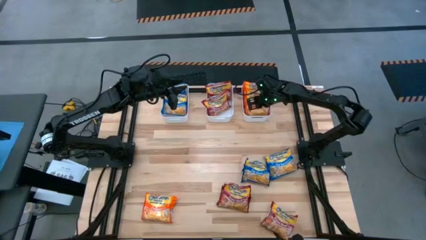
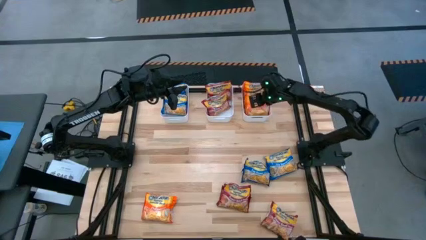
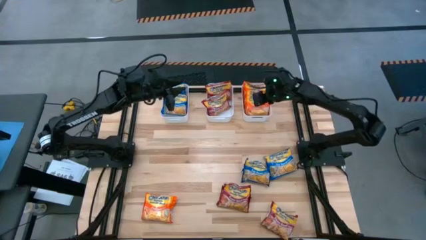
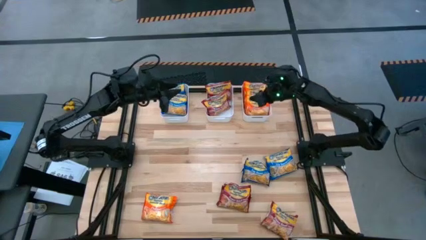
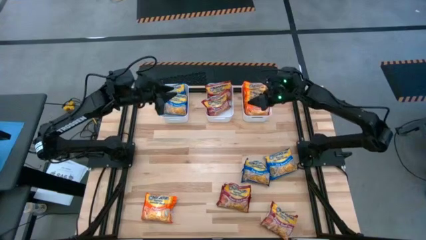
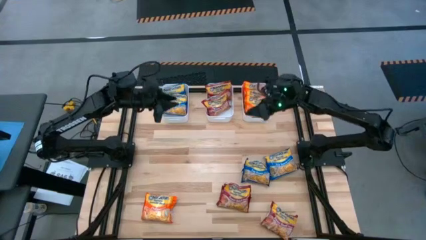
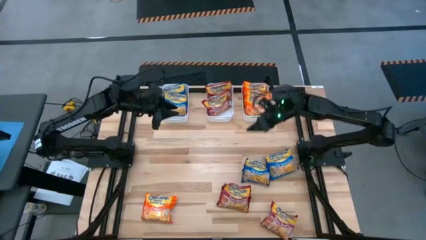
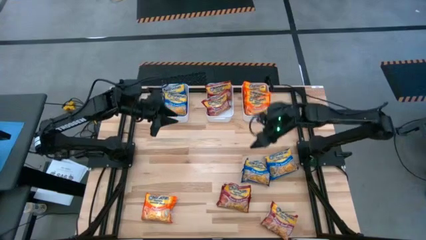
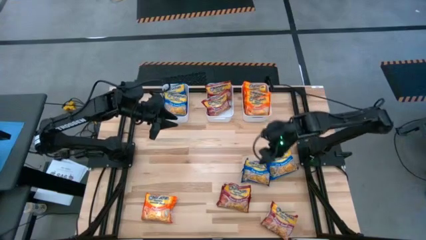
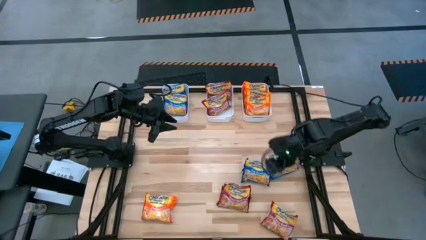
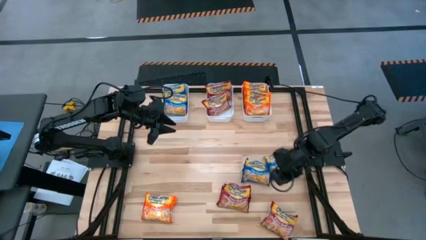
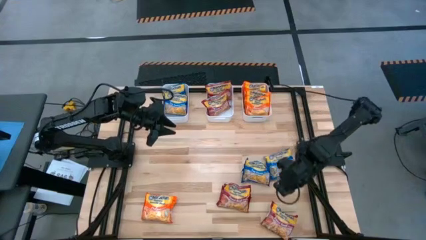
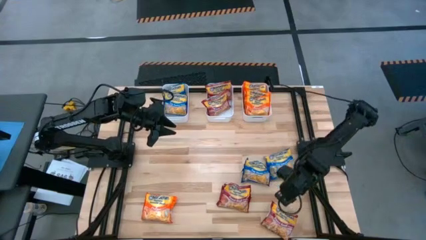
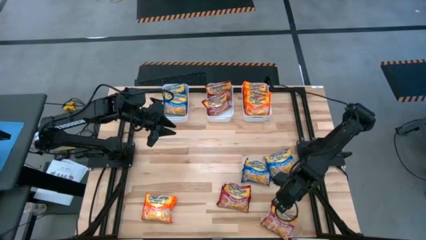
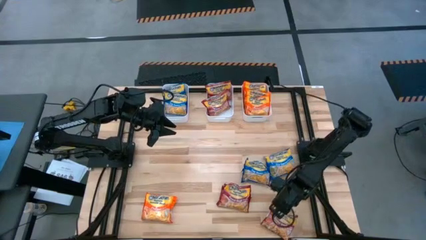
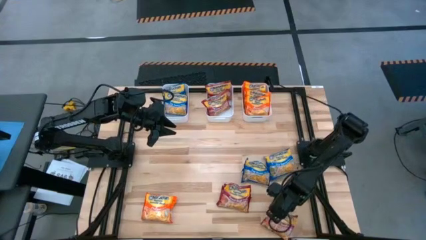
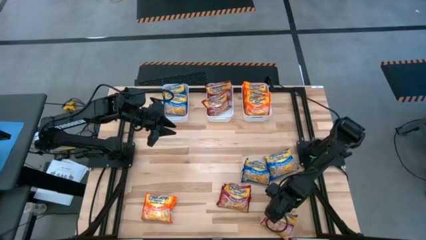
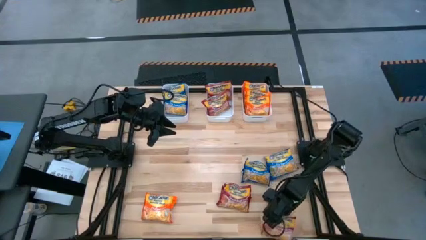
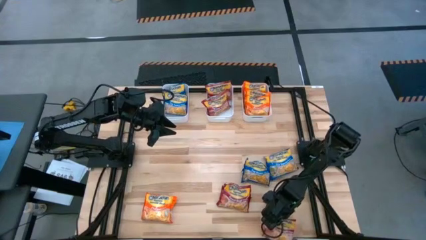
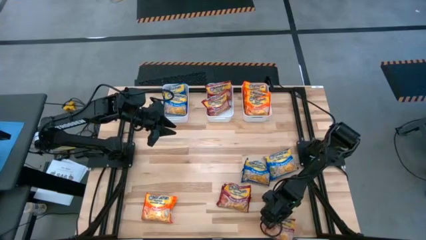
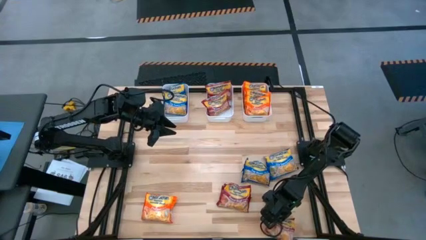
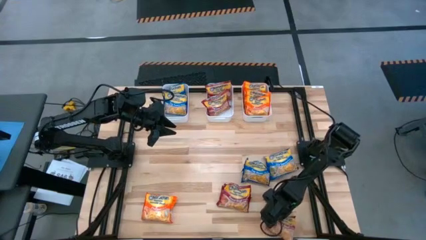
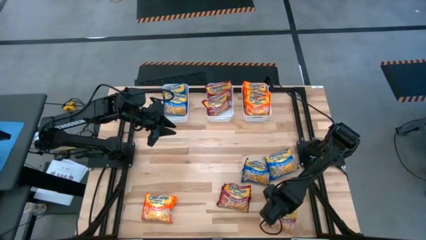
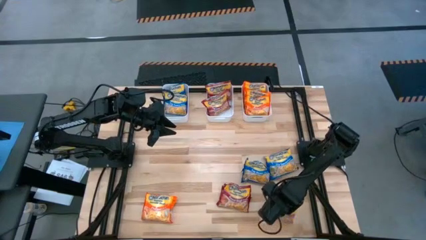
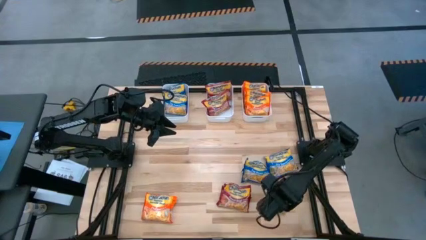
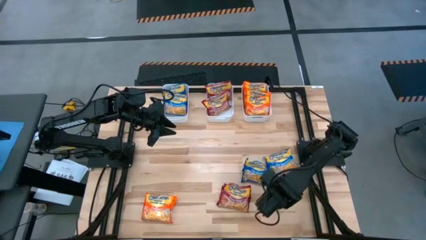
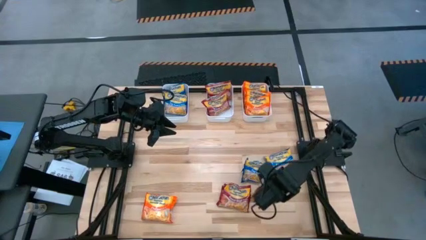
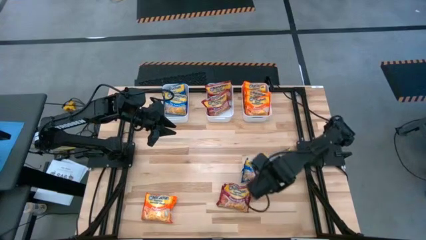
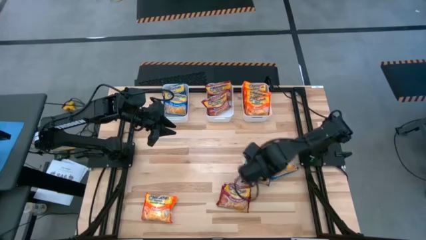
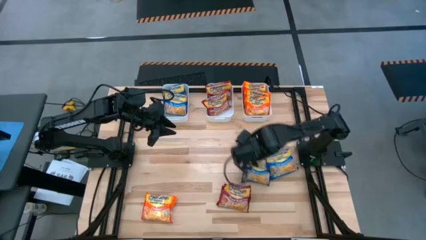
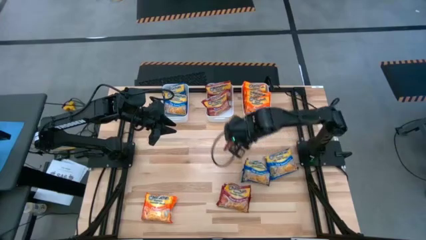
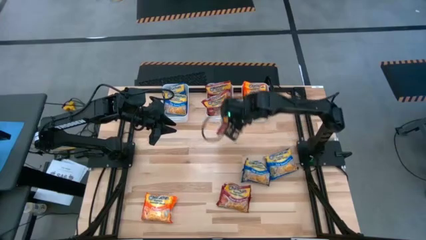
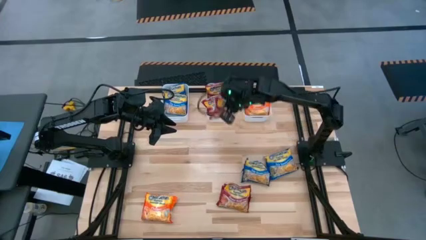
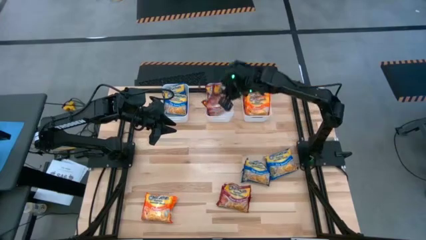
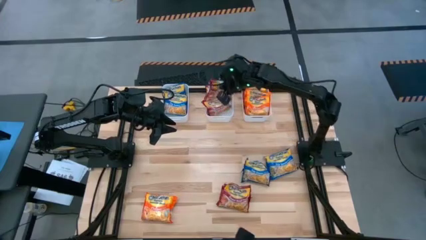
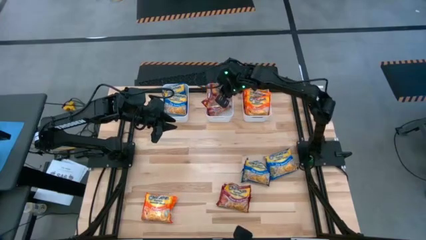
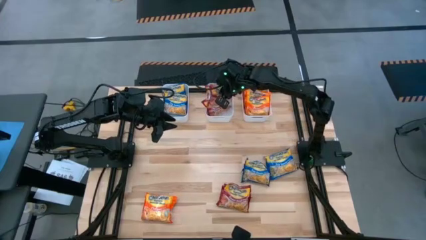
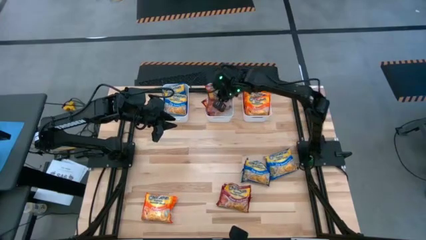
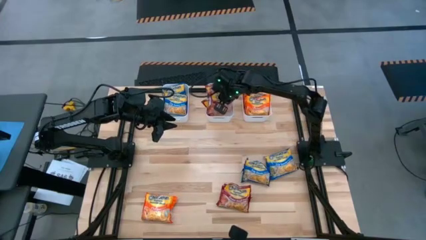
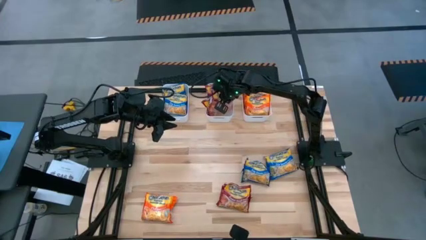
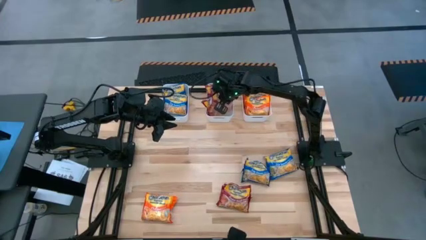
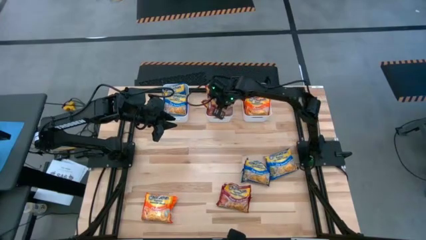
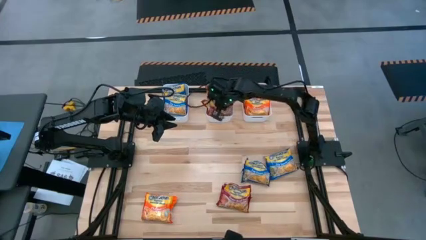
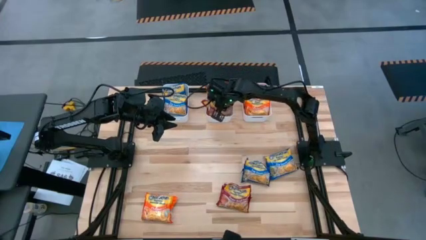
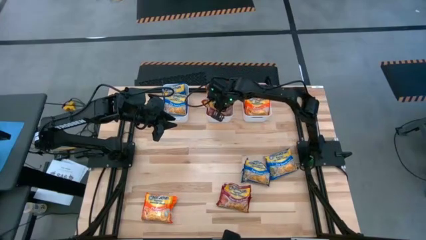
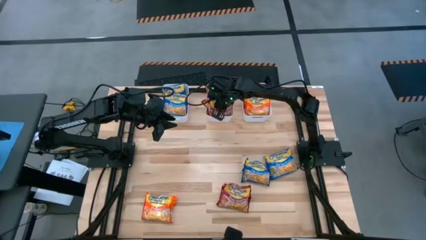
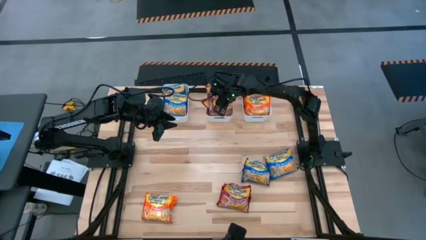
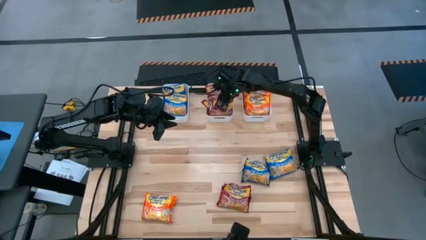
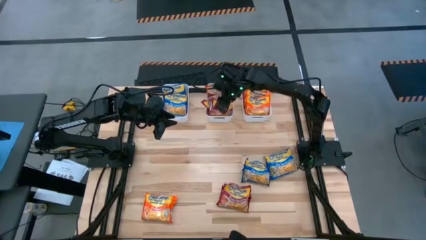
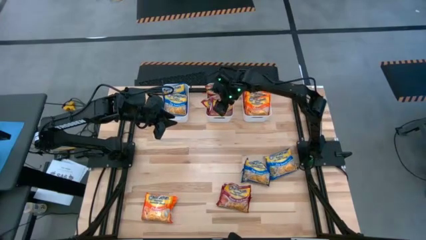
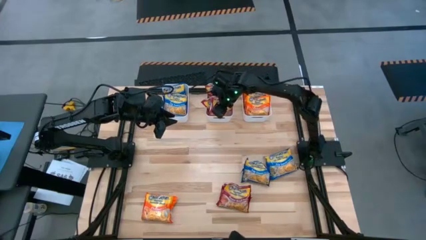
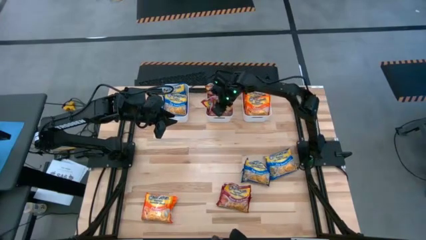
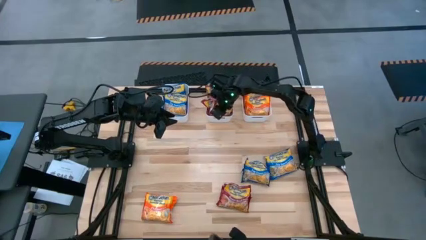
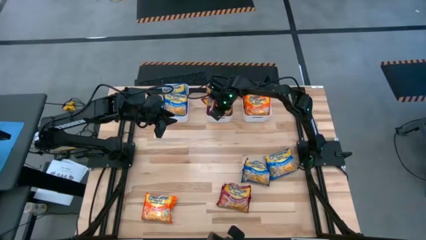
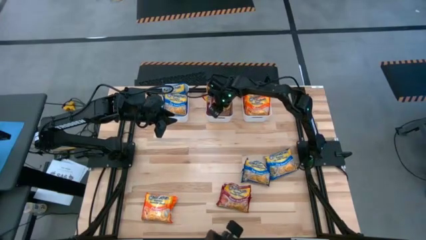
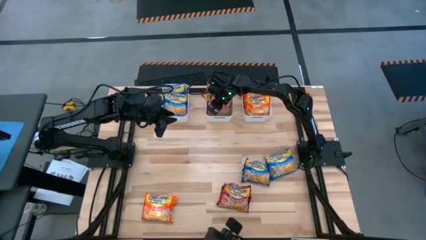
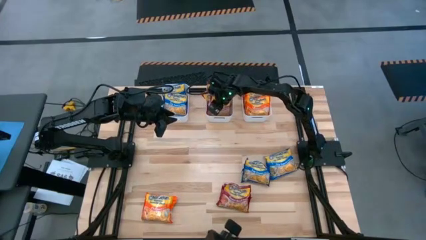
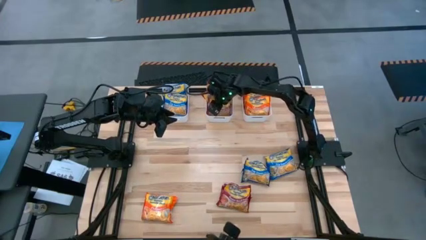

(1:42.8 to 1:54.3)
Task: Sort Maruchan noodles
Put the red noodle pack into the middle white bin
